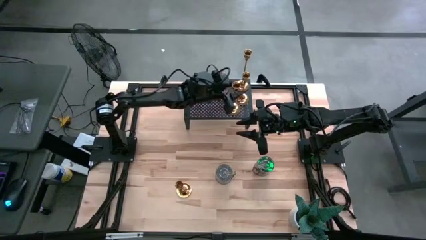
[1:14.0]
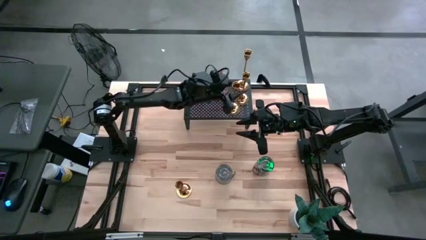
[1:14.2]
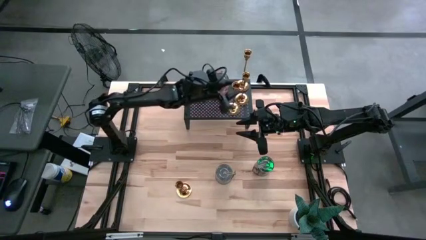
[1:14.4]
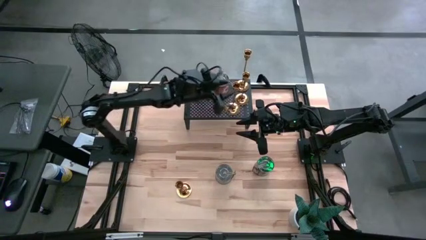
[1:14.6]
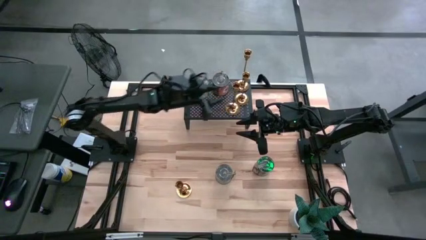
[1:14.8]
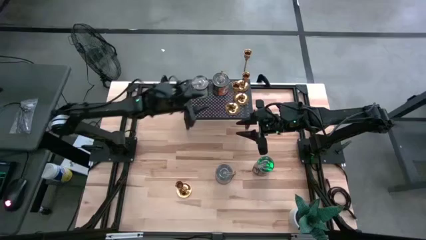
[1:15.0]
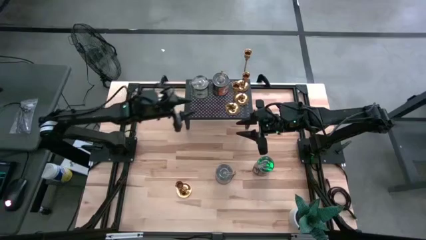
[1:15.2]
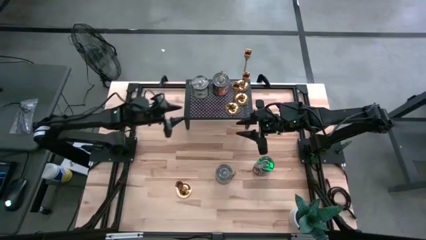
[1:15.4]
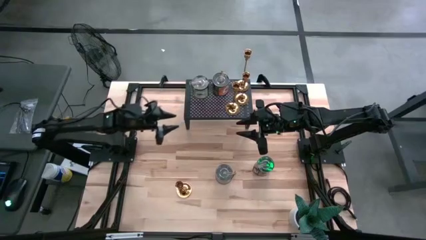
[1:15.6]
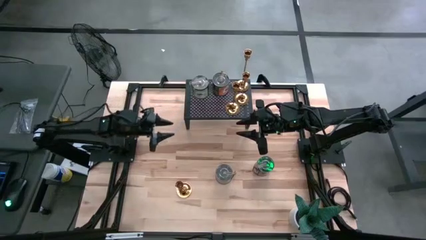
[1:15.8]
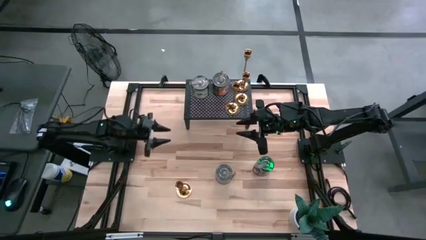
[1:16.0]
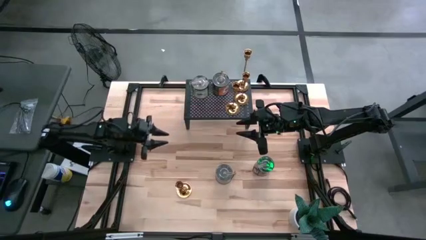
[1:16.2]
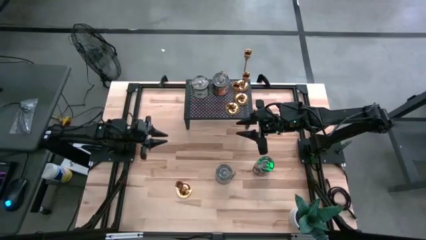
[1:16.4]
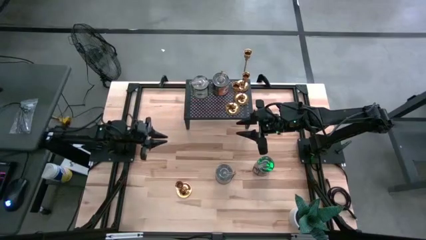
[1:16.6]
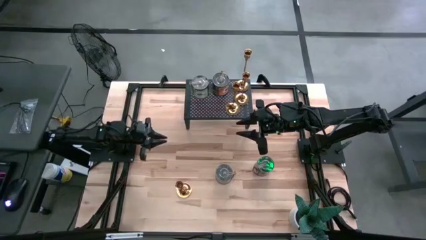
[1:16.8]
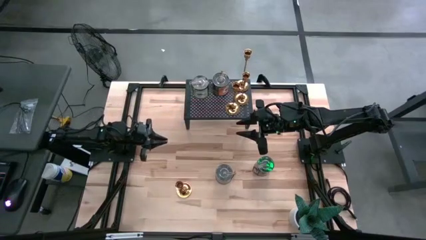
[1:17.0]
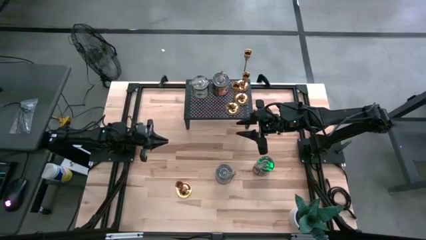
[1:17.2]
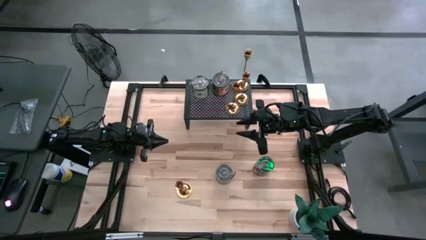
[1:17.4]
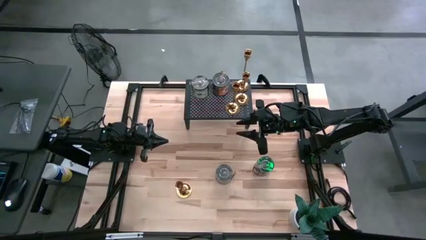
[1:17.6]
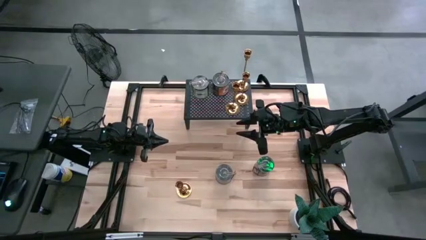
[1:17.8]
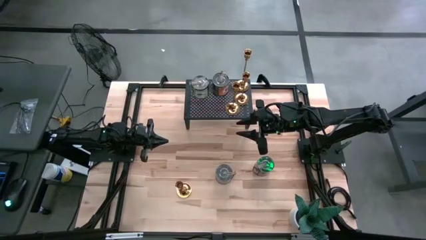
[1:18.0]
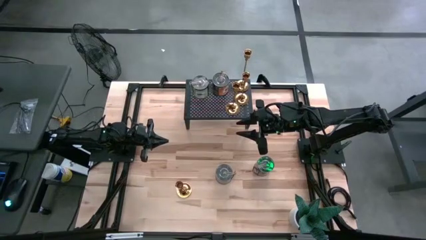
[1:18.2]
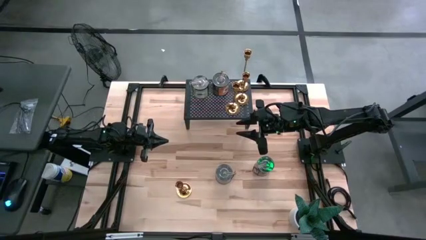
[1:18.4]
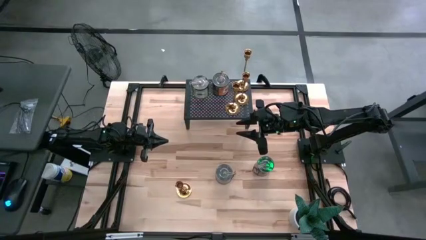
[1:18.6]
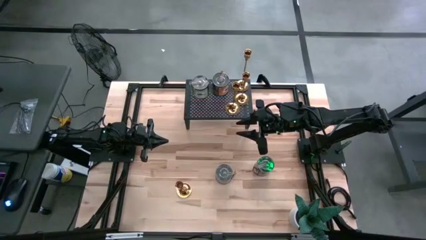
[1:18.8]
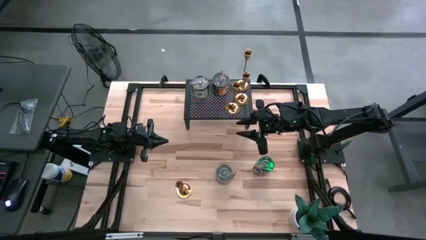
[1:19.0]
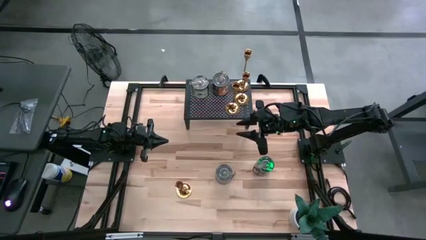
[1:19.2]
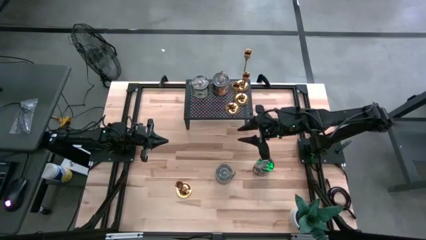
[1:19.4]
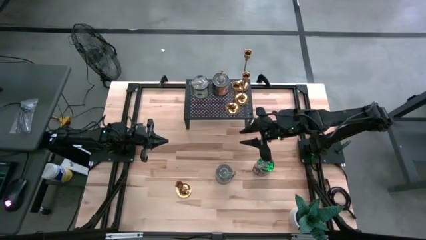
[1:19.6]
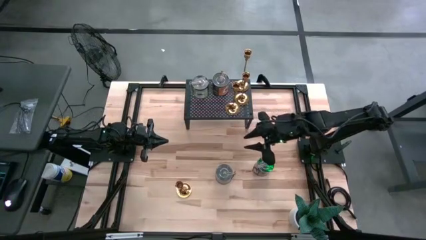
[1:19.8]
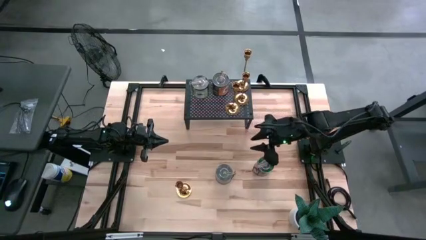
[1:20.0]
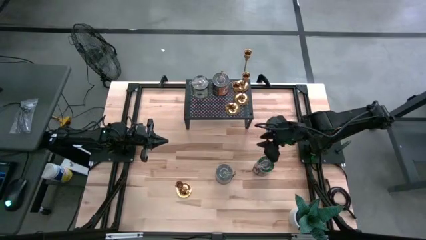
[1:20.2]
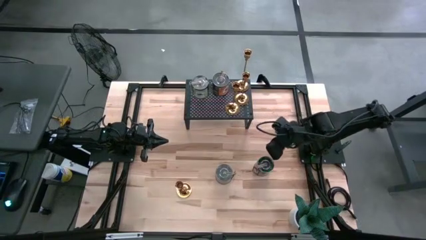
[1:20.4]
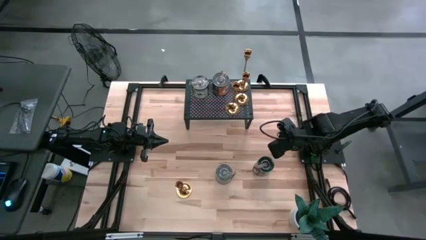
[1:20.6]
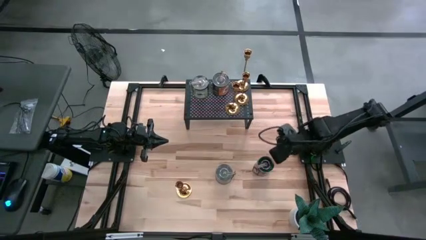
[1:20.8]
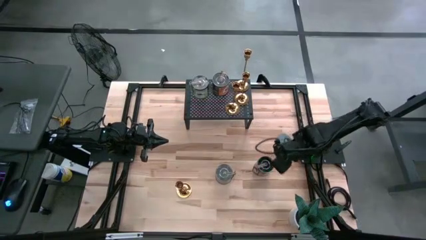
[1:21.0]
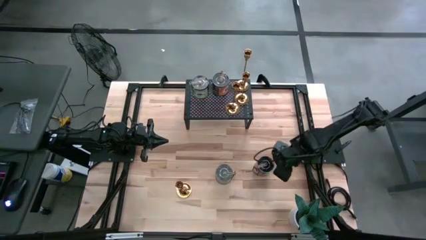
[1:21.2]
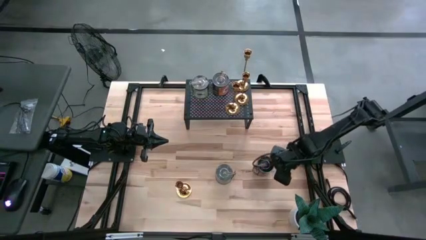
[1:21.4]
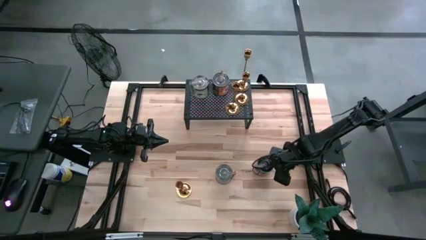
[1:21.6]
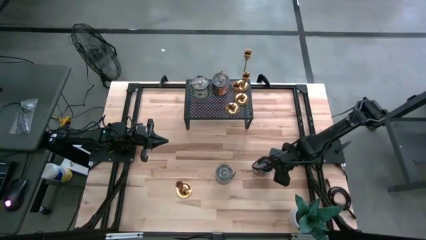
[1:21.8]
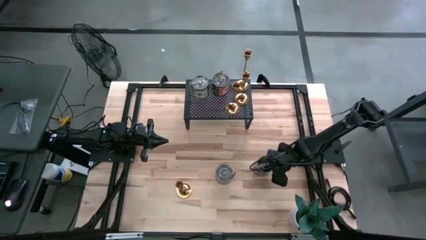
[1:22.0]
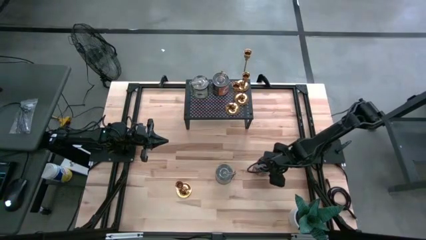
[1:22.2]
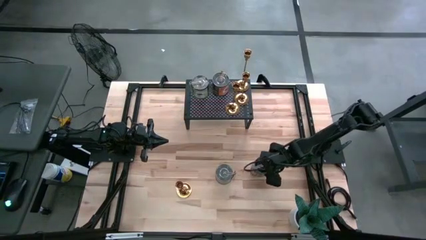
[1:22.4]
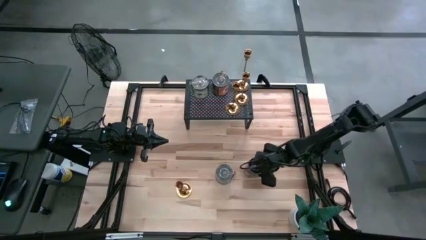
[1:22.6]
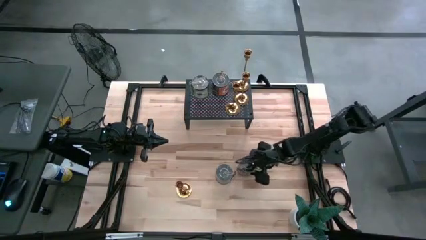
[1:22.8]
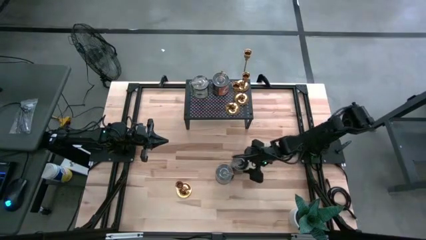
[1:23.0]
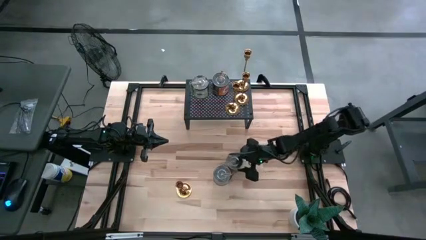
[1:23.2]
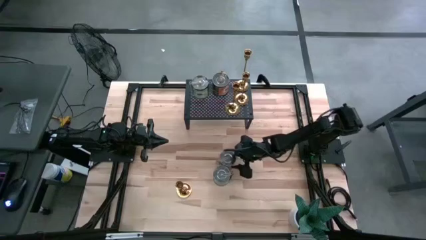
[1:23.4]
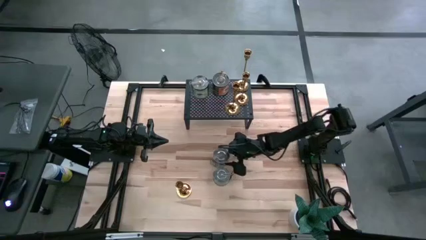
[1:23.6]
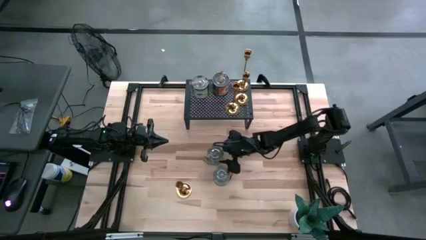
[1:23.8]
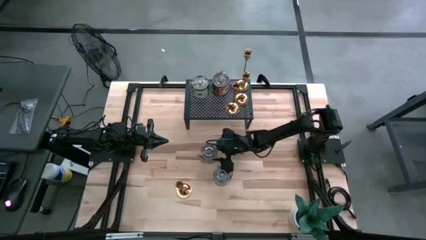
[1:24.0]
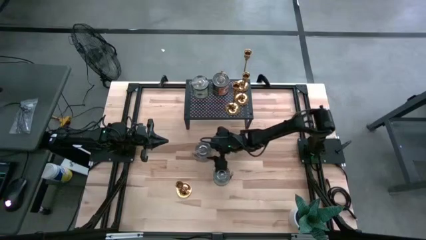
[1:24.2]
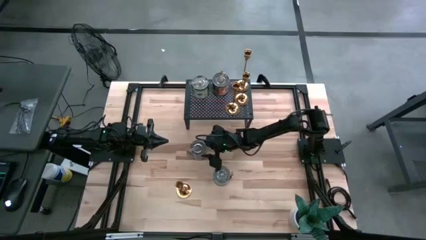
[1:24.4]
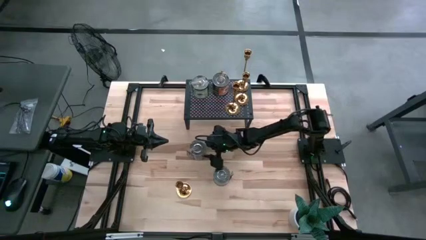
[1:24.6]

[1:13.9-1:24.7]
Task: Pick & Place candle stick holders
Move the brown scented candle to the middle of the table

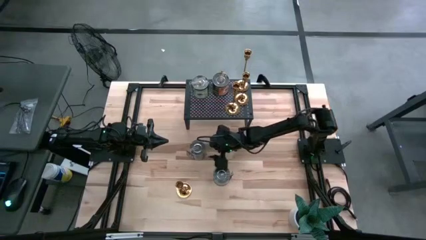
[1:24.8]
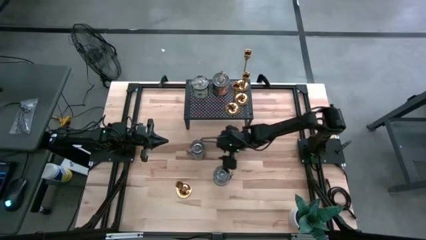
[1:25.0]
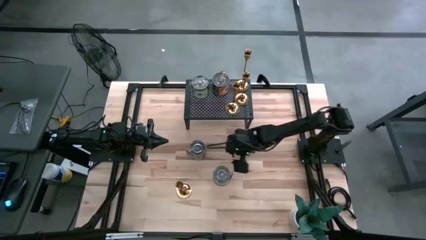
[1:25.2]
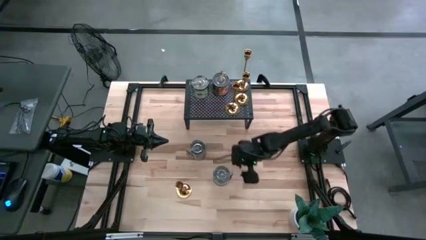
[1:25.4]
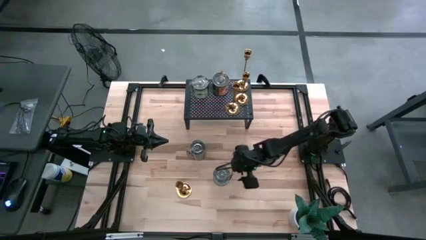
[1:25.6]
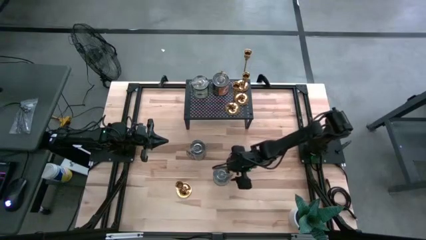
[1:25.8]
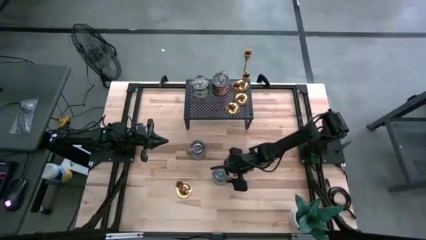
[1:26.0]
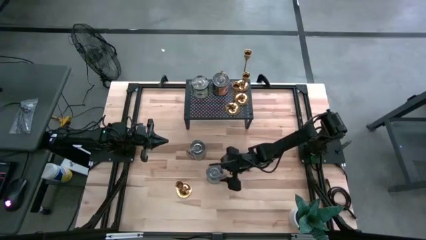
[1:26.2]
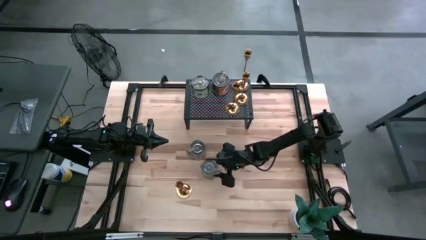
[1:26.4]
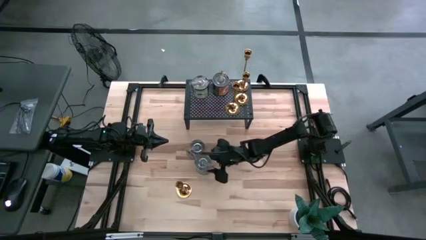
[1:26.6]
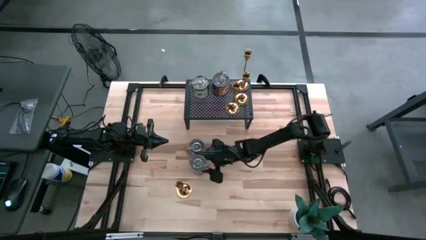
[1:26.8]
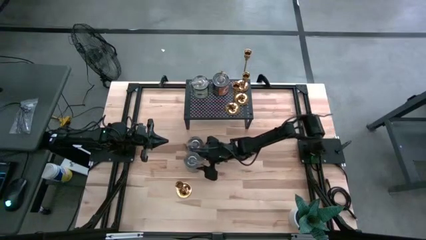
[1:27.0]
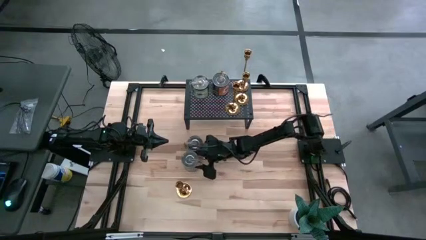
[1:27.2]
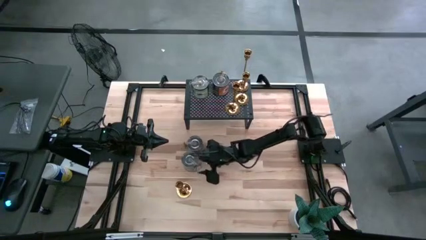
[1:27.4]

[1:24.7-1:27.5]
Move the brown scented candle to the left of the table

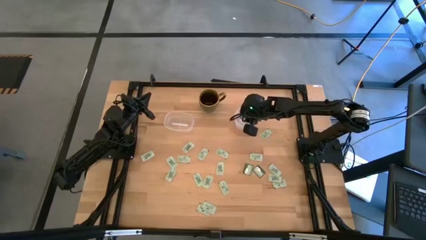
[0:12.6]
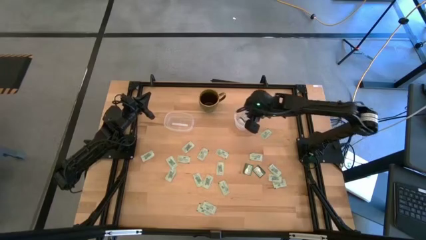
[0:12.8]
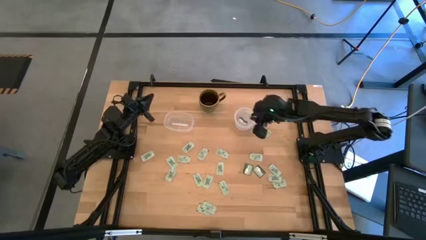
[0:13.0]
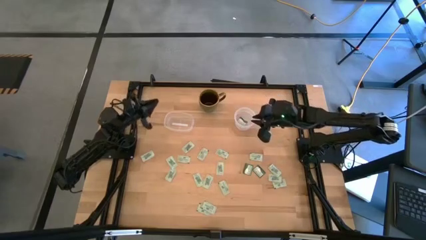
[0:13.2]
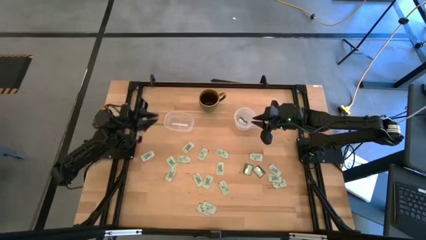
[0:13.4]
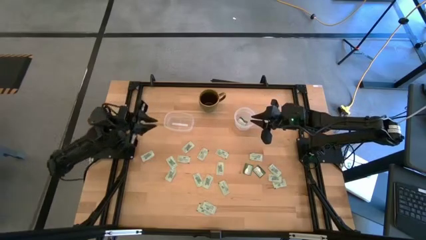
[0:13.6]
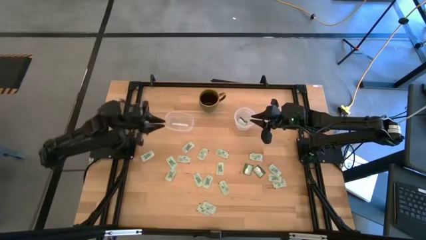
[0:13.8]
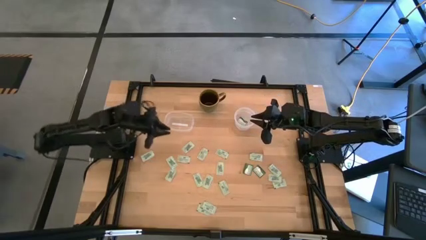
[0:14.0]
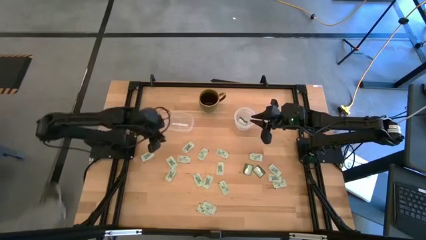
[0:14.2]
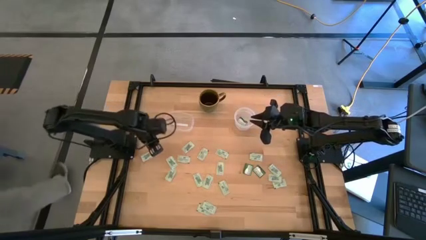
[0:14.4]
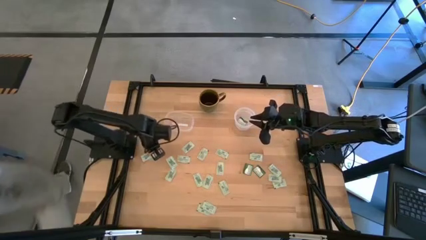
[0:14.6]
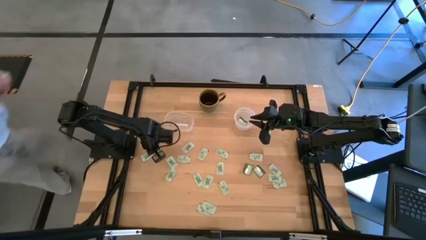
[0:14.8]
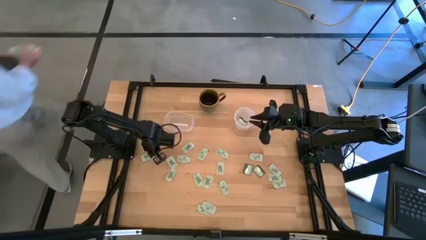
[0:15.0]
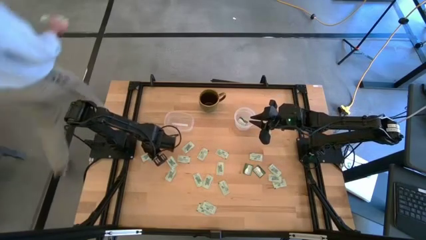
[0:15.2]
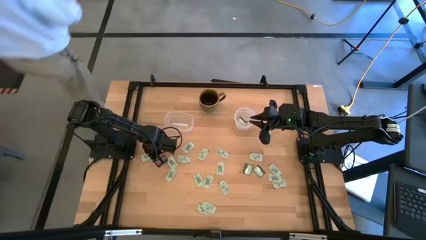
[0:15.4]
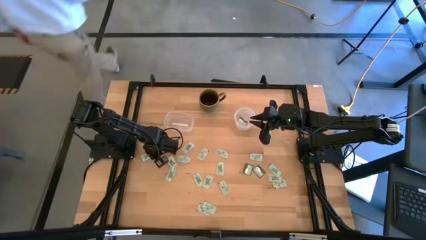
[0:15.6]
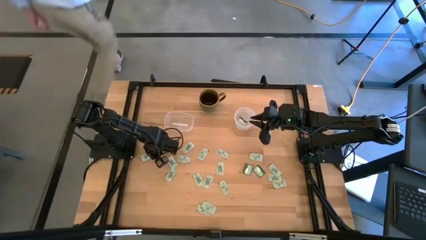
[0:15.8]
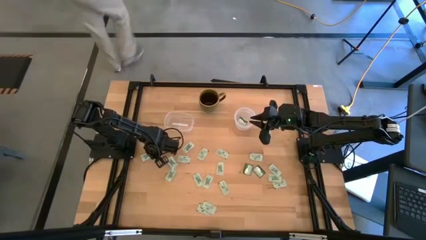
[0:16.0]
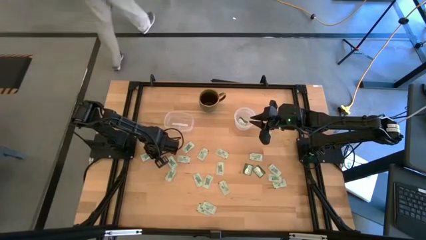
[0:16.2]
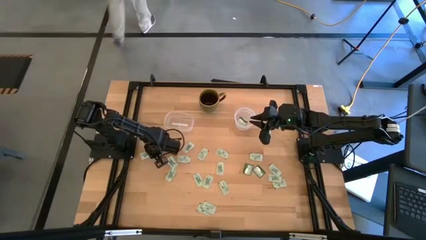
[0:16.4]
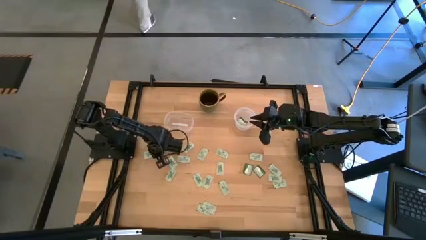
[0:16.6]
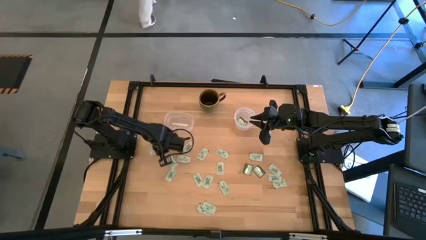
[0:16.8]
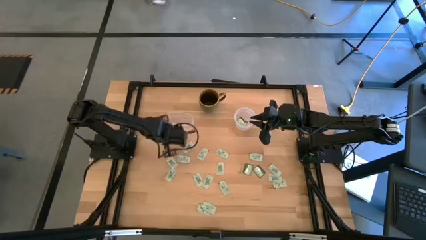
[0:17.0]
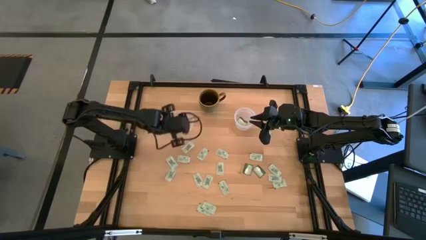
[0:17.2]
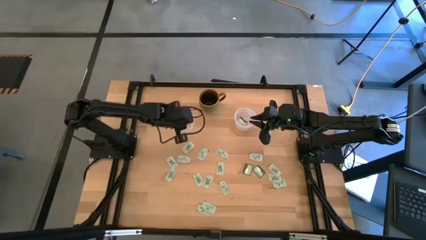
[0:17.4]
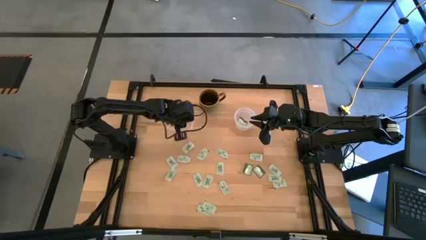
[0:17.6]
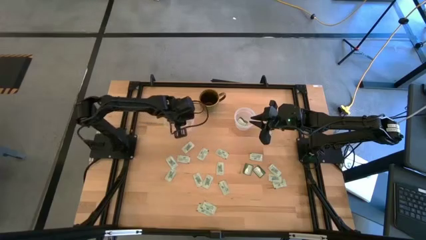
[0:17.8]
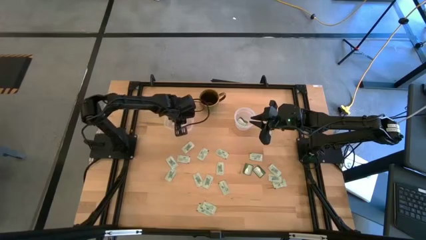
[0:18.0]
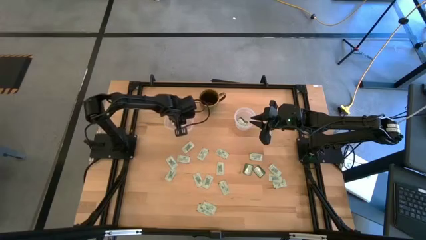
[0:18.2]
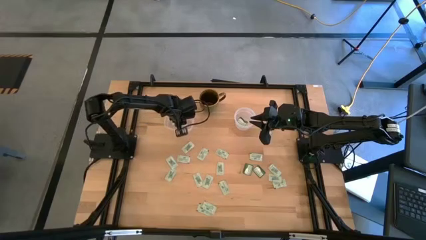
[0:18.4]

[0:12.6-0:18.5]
Task: Pick and place Stevia / Truvia into bins
Put the light green stevia packet into the left transparent container
